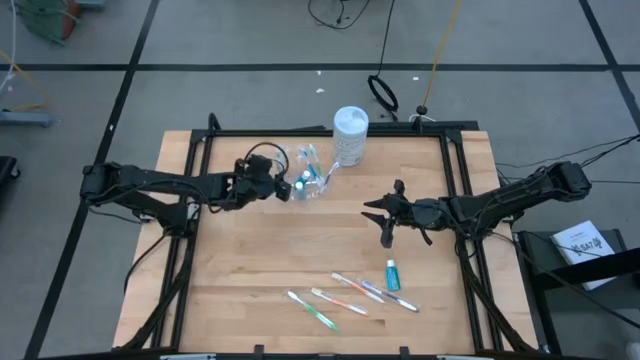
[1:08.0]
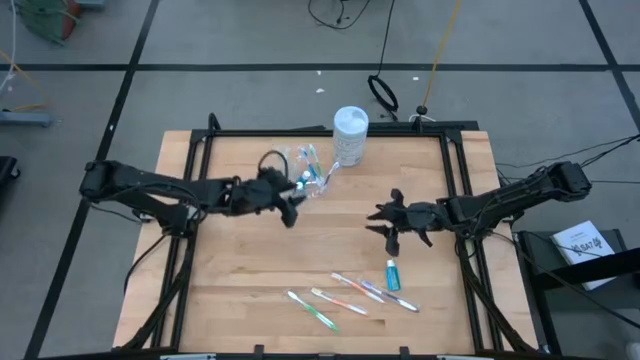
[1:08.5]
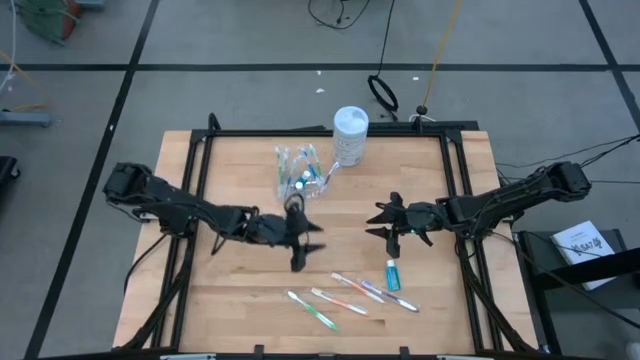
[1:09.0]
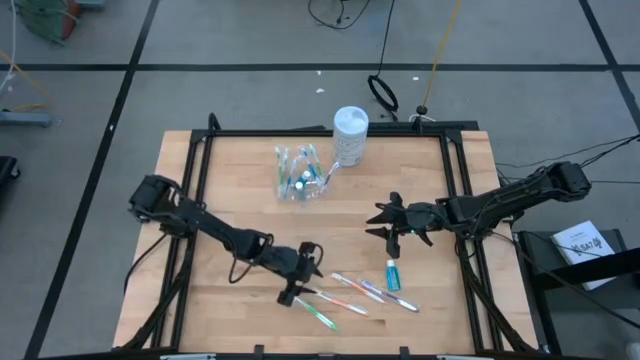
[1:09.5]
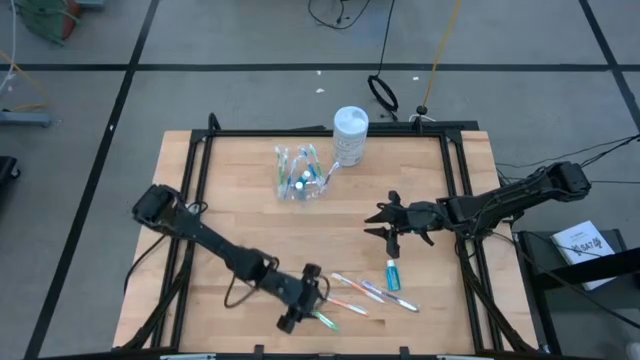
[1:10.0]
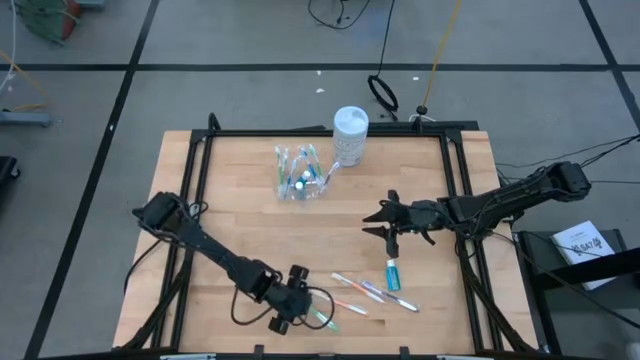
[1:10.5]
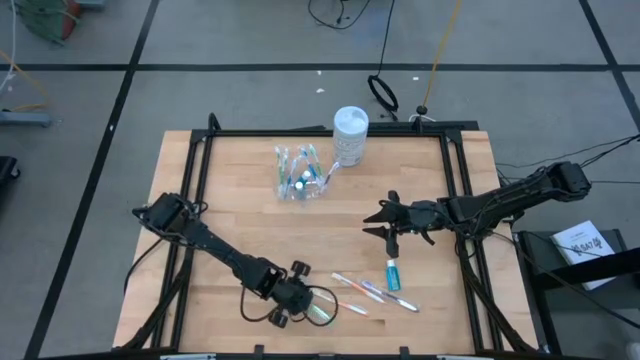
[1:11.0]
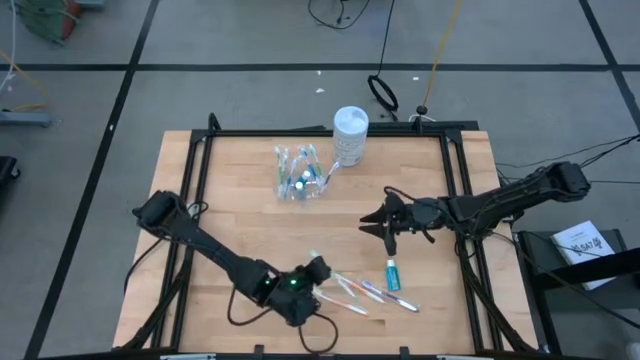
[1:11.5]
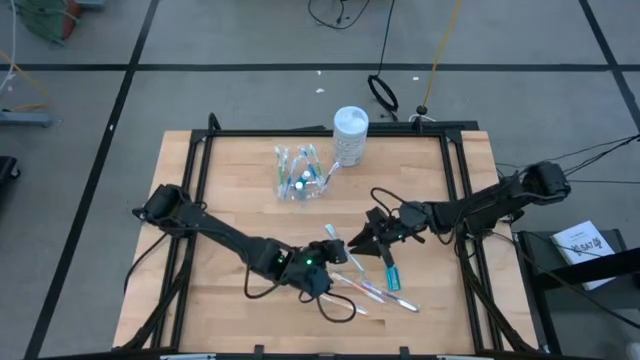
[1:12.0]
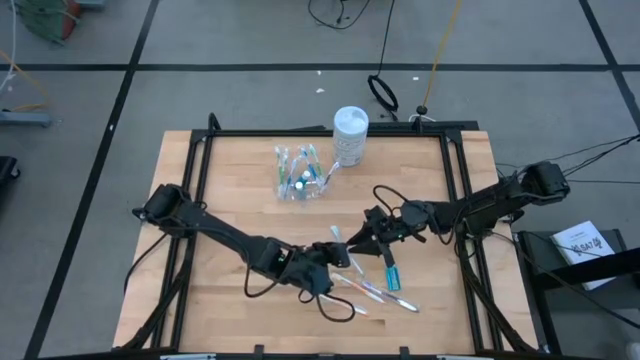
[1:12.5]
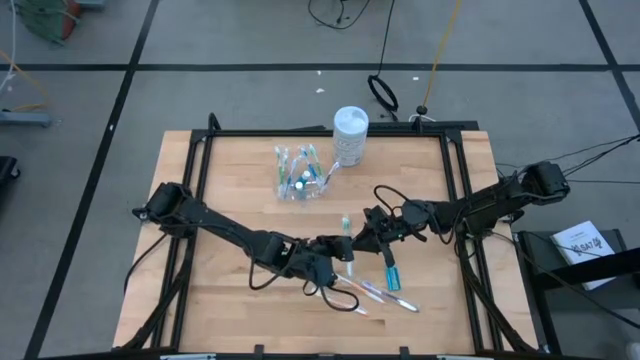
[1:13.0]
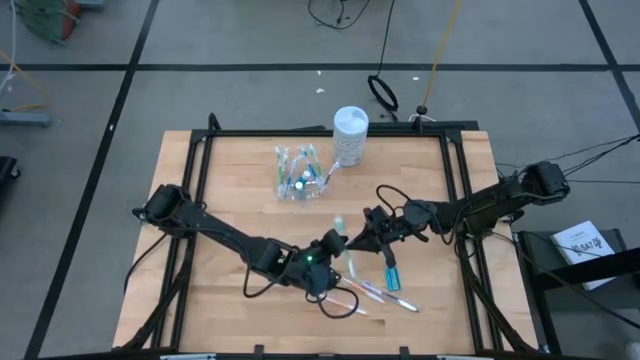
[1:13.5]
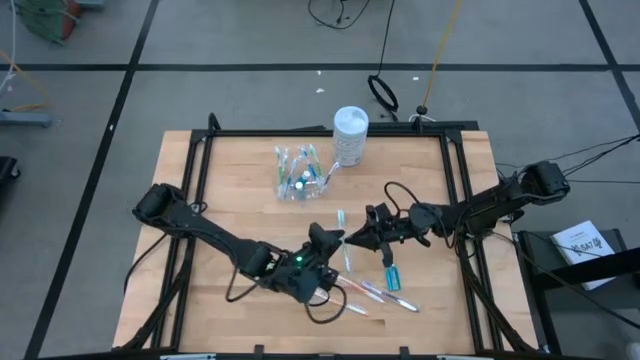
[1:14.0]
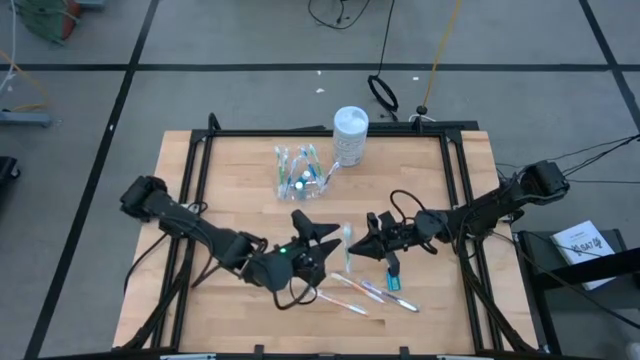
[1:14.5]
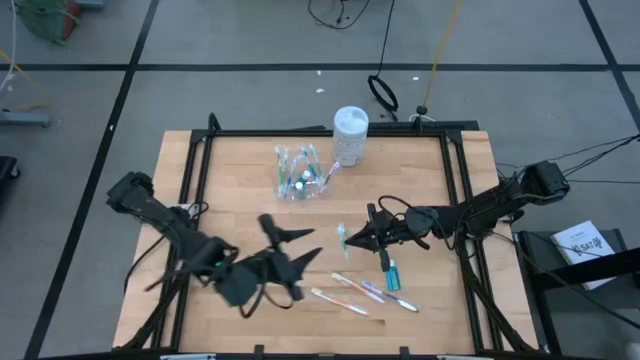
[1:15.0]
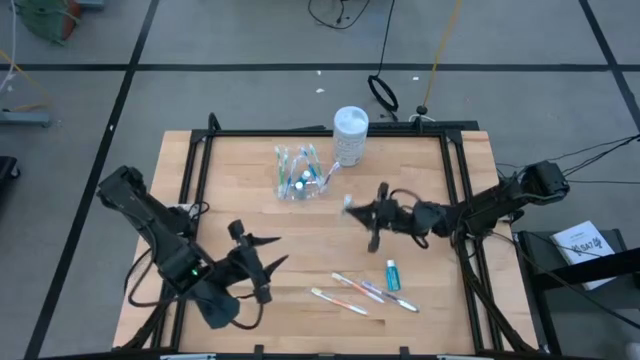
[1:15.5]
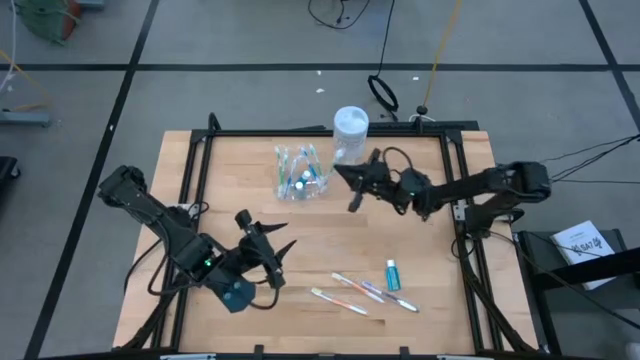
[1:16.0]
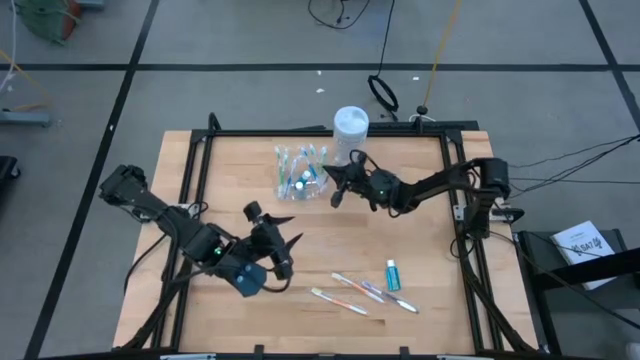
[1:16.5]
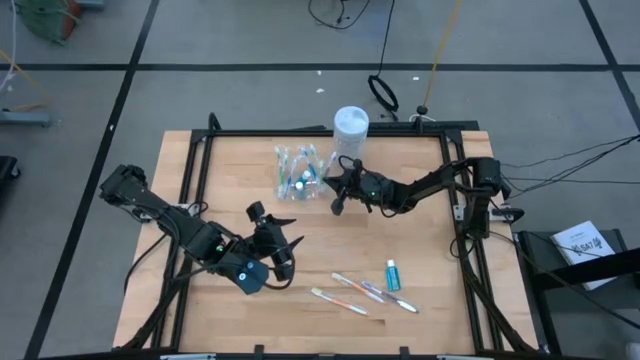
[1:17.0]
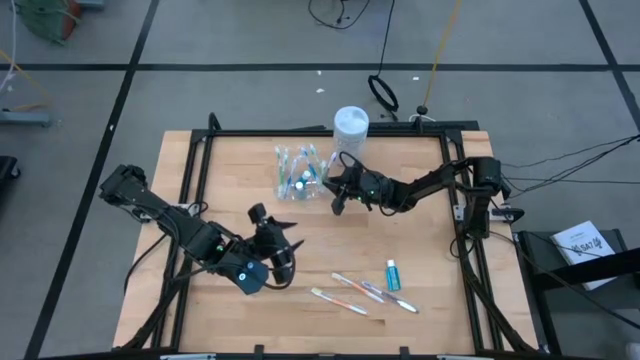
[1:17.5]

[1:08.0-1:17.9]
Task: Pick & Place toothbrushing station
Put the green toothbrush into the transparent organizer

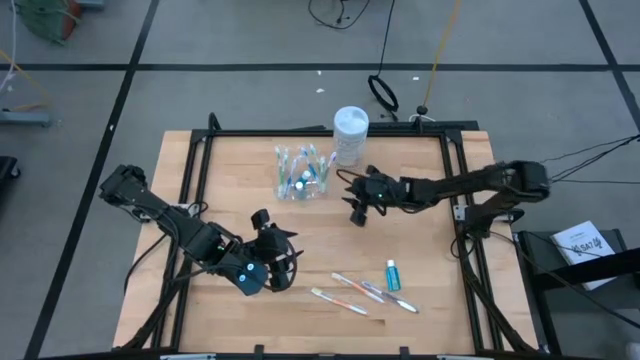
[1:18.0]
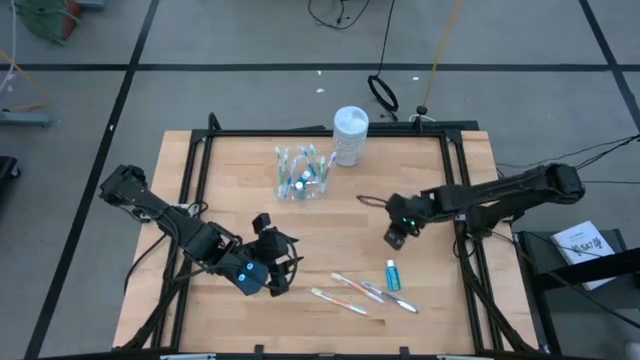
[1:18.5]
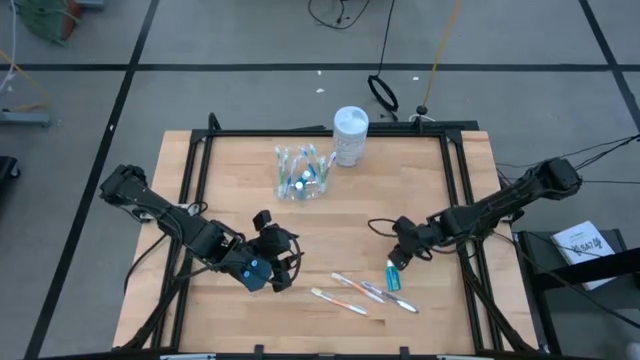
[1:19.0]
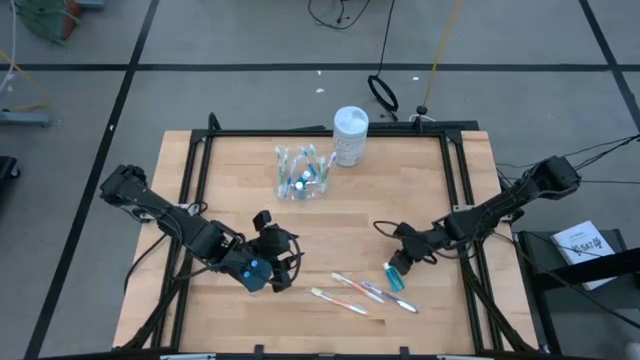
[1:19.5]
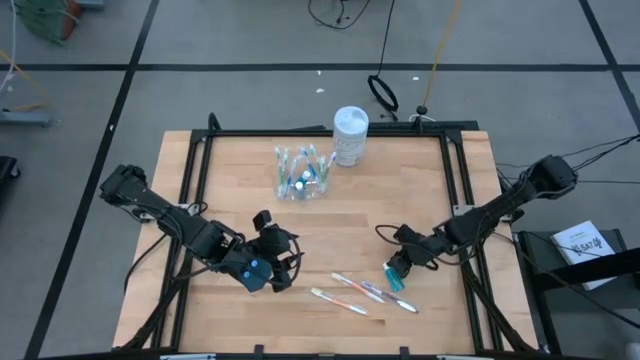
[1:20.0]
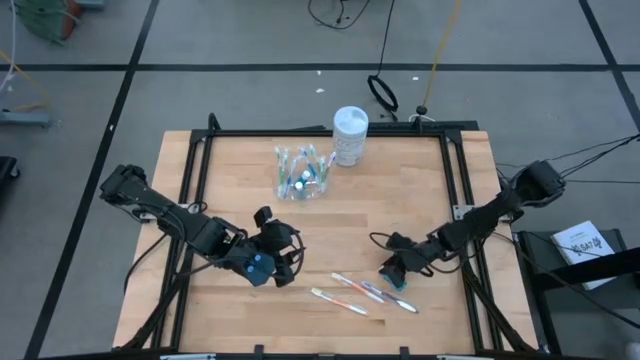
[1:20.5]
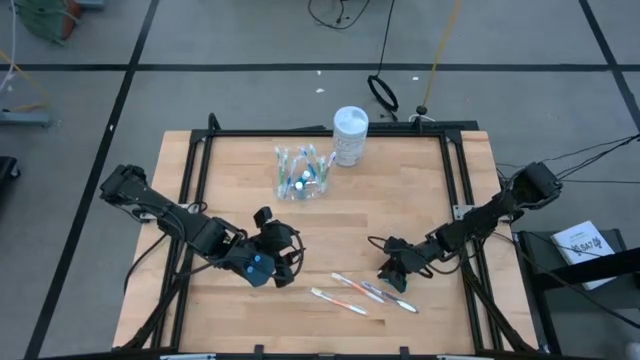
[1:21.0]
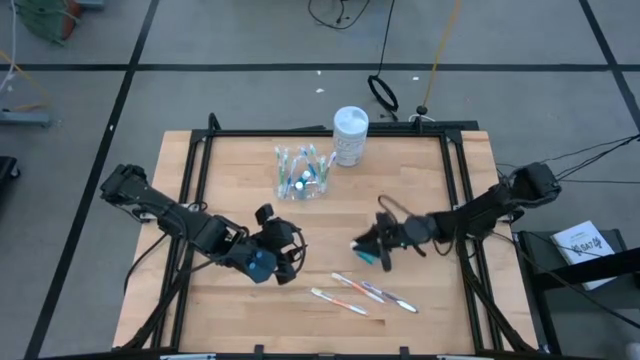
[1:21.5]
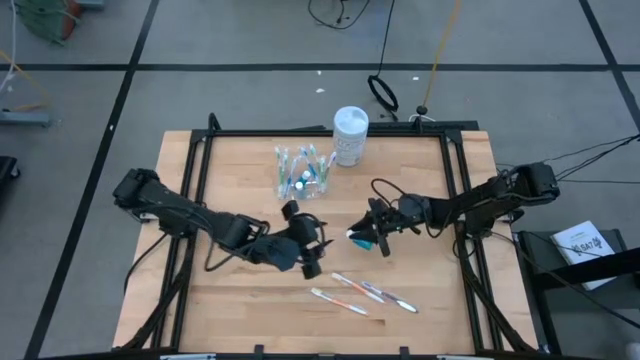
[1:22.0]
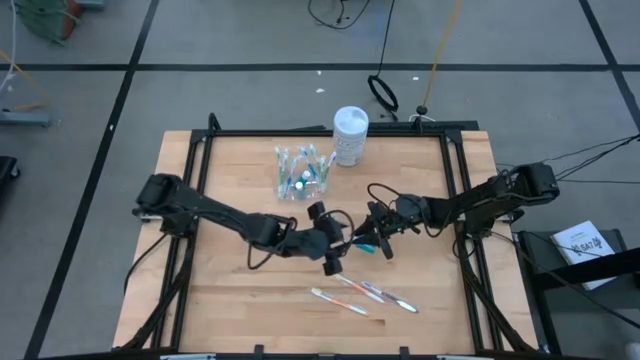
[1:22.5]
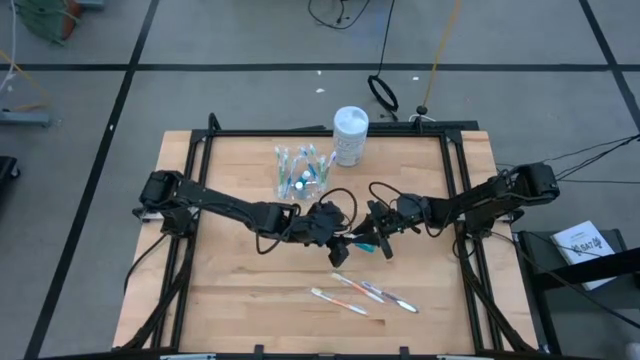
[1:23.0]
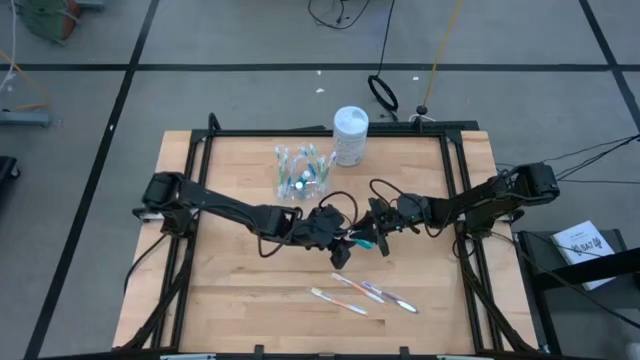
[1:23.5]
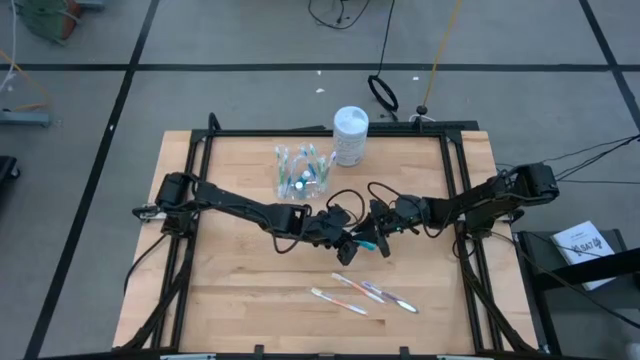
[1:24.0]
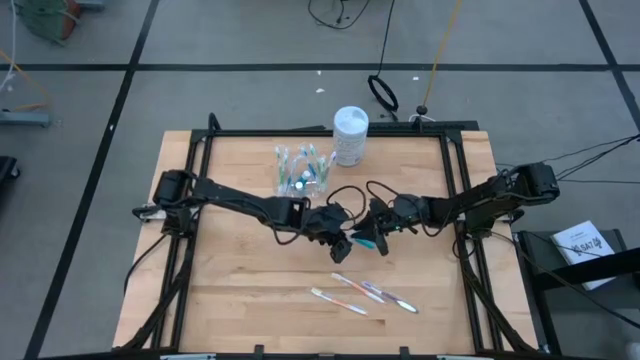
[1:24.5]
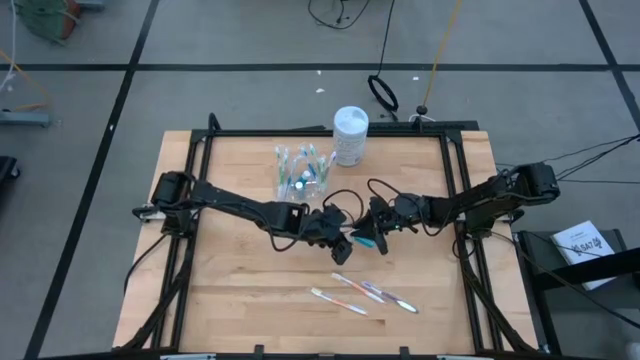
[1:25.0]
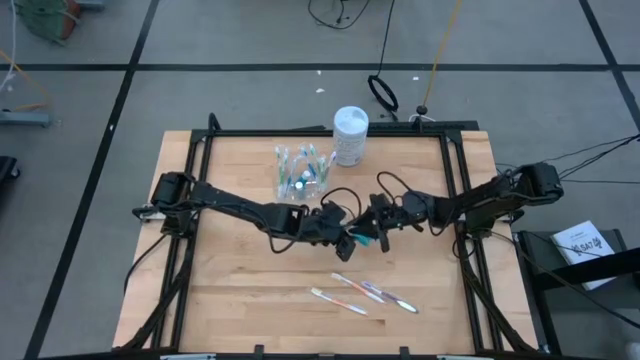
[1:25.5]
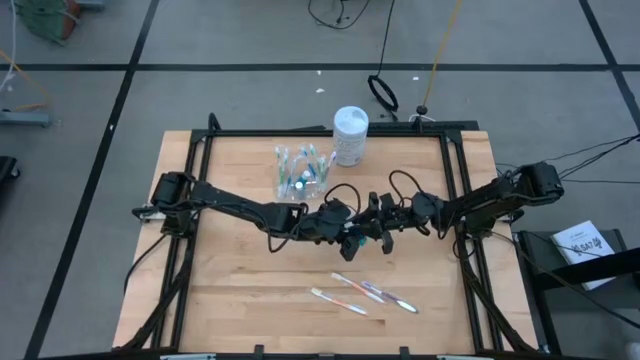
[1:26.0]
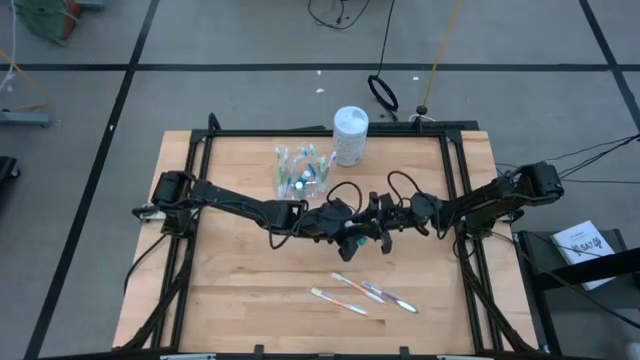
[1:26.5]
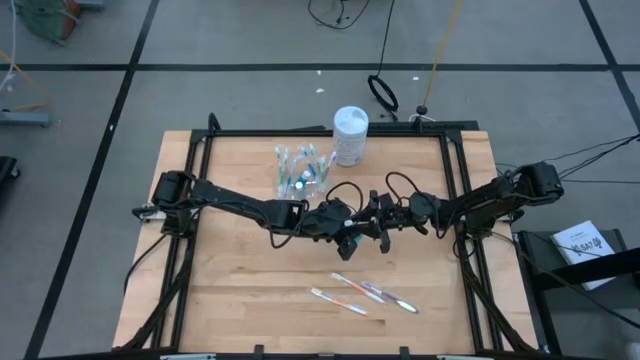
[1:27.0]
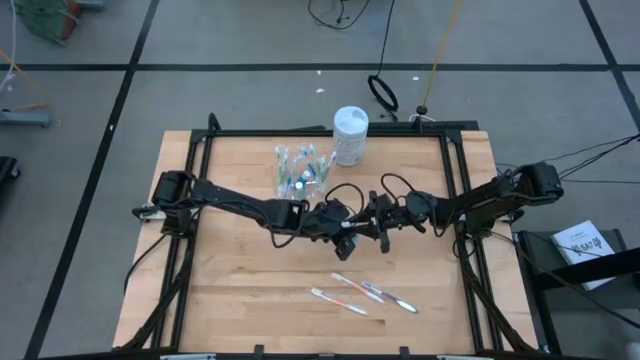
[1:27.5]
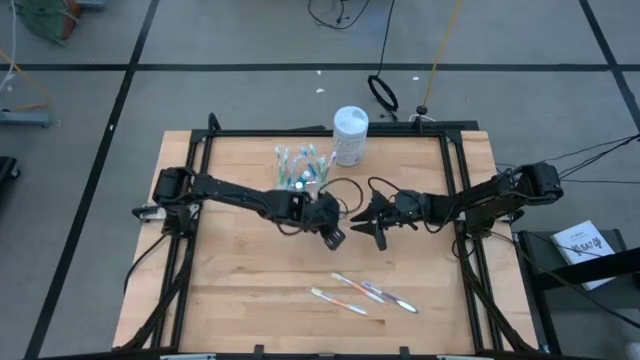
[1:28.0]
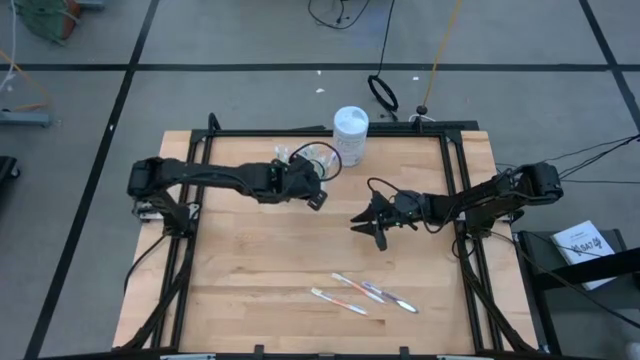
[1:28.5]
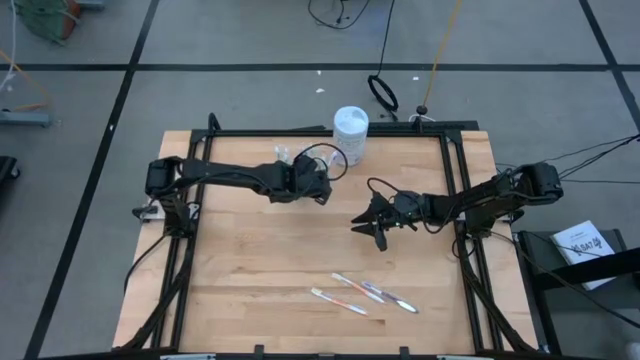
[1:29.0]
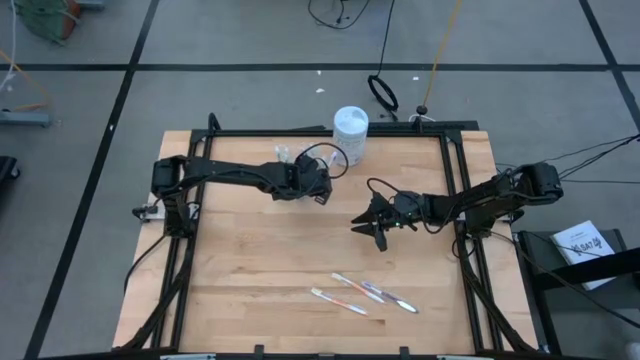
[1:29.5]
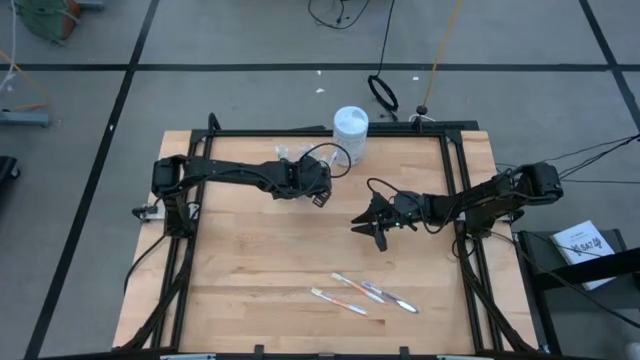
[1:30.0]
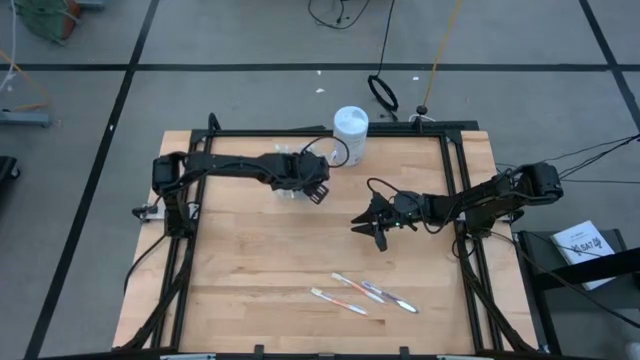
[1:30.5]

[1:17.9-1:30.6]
Put the blue mouthwash bottle into the transparent organizer
